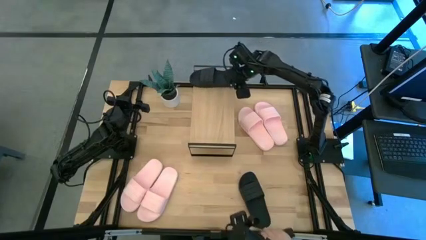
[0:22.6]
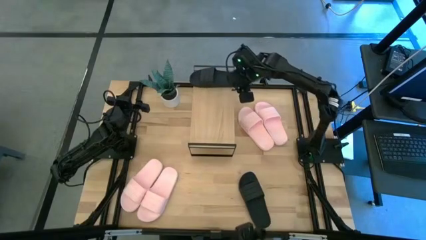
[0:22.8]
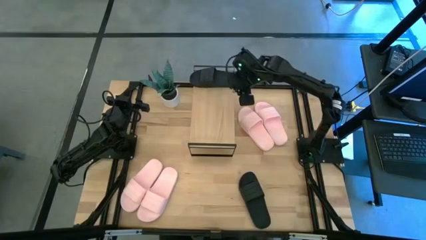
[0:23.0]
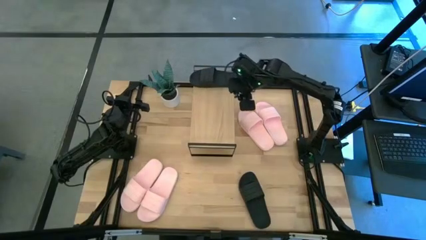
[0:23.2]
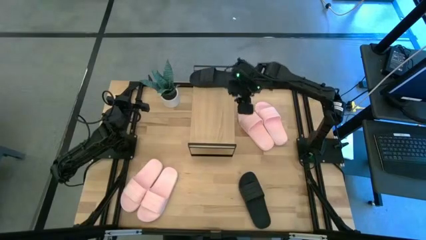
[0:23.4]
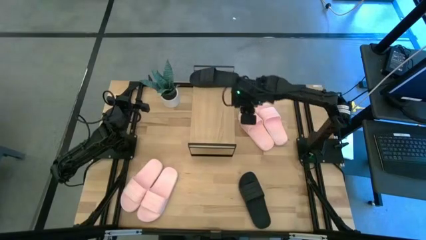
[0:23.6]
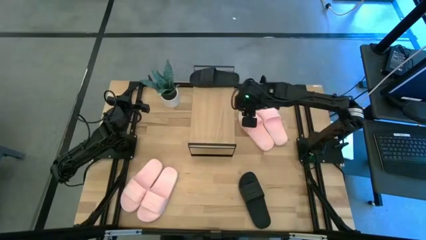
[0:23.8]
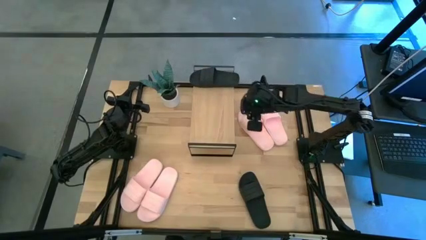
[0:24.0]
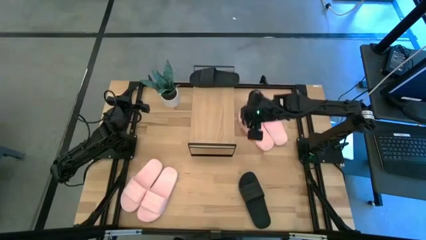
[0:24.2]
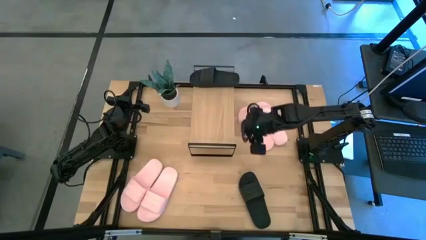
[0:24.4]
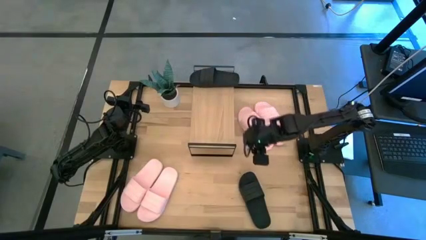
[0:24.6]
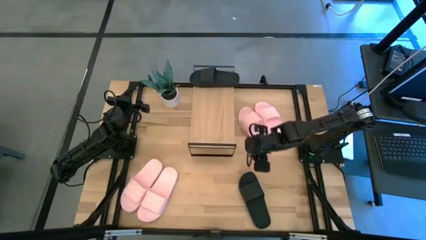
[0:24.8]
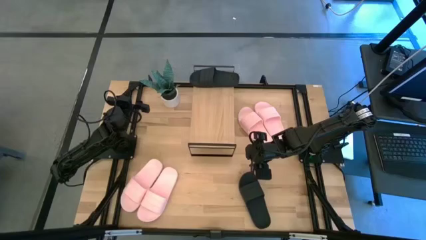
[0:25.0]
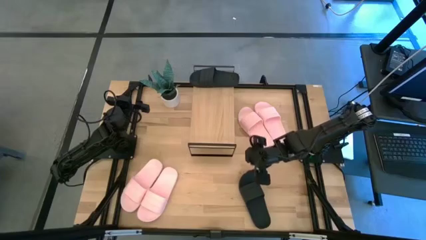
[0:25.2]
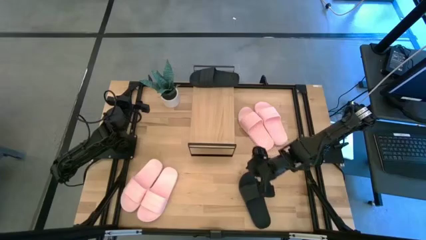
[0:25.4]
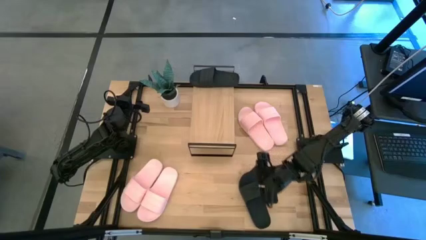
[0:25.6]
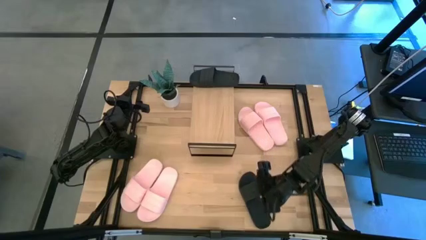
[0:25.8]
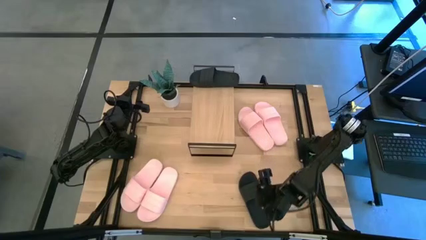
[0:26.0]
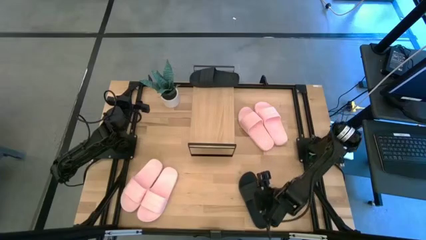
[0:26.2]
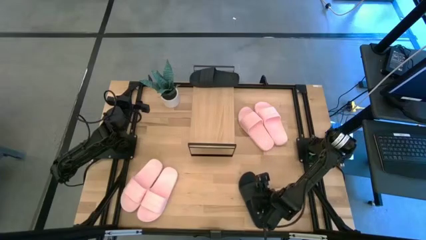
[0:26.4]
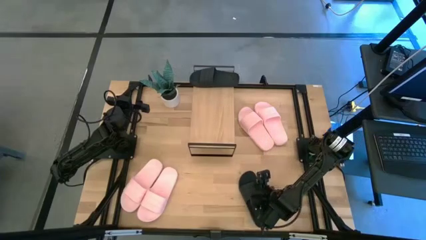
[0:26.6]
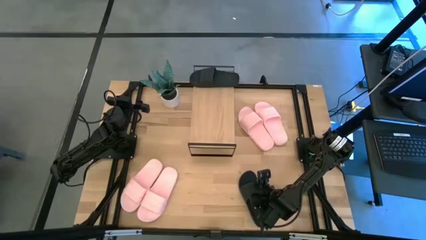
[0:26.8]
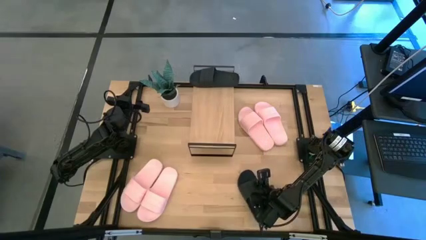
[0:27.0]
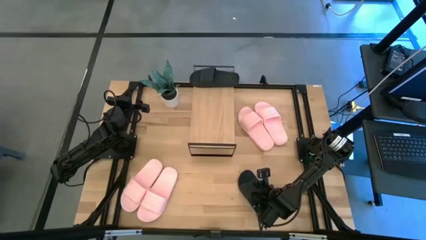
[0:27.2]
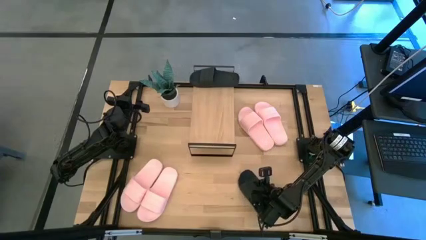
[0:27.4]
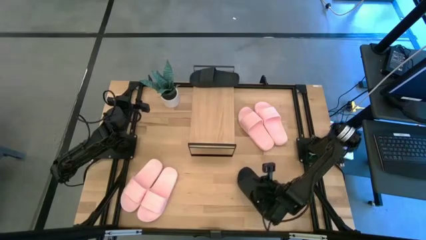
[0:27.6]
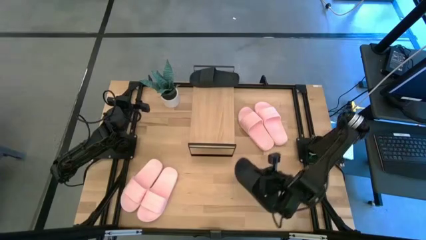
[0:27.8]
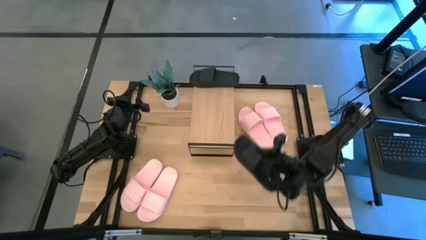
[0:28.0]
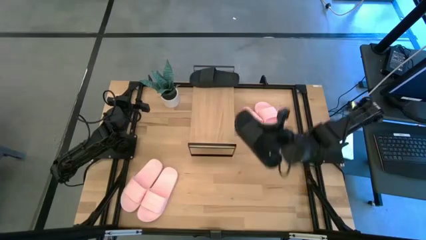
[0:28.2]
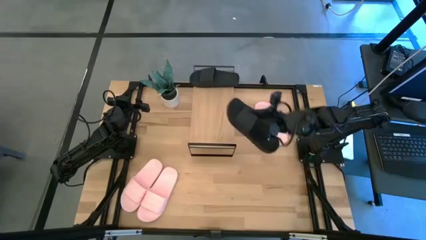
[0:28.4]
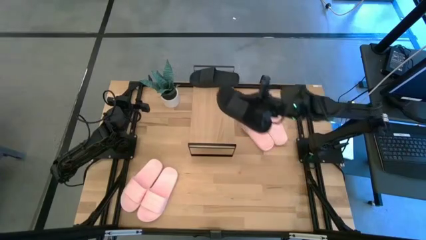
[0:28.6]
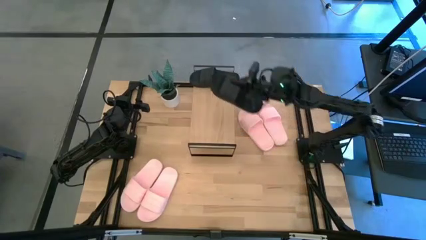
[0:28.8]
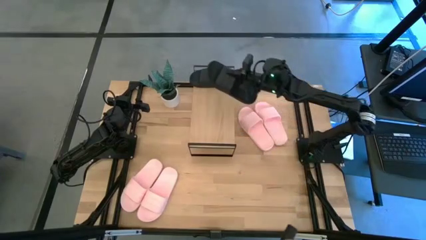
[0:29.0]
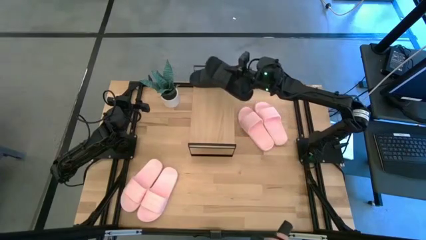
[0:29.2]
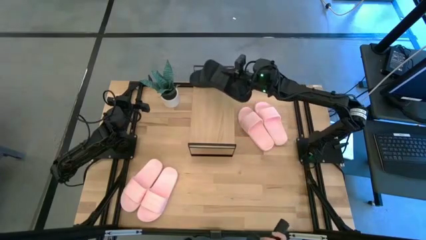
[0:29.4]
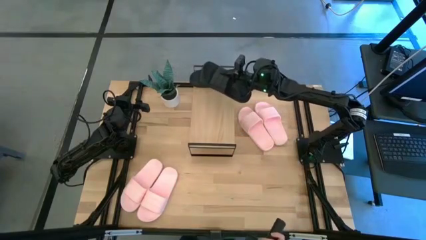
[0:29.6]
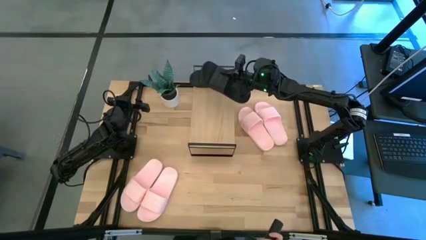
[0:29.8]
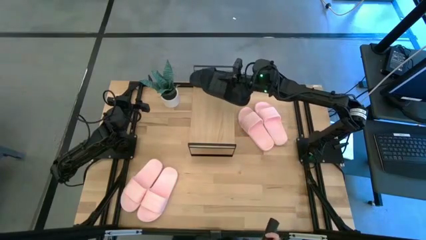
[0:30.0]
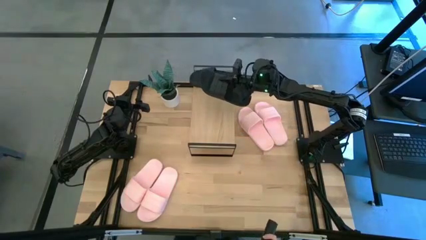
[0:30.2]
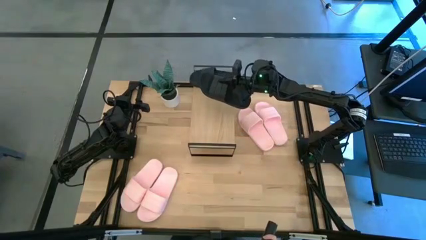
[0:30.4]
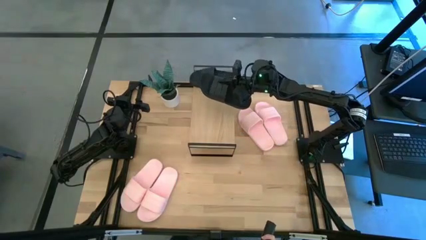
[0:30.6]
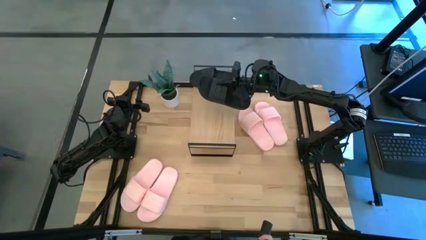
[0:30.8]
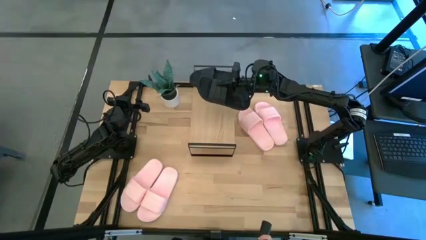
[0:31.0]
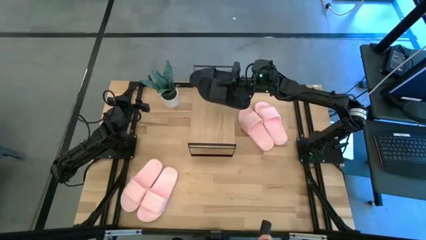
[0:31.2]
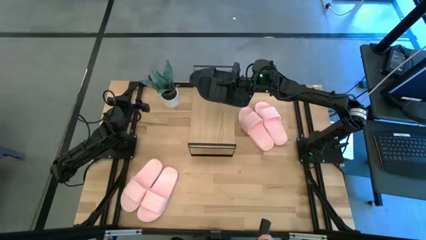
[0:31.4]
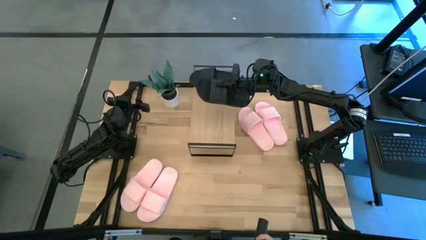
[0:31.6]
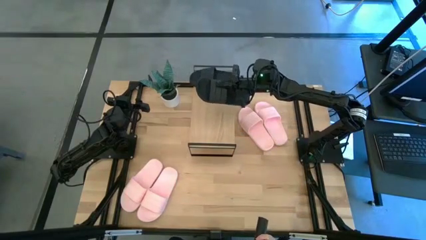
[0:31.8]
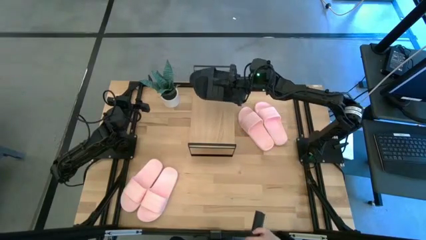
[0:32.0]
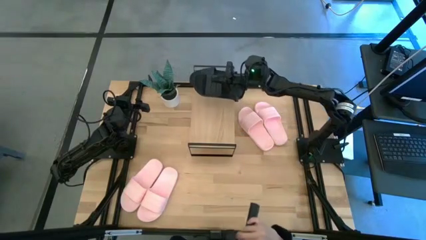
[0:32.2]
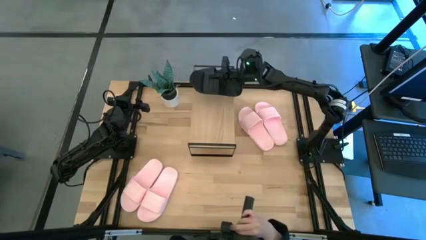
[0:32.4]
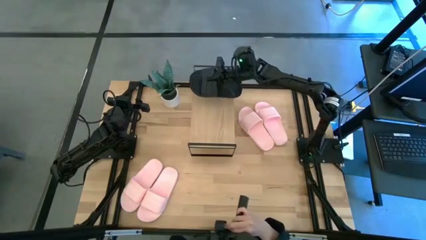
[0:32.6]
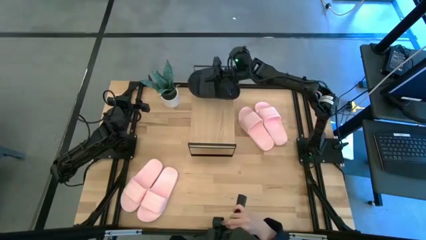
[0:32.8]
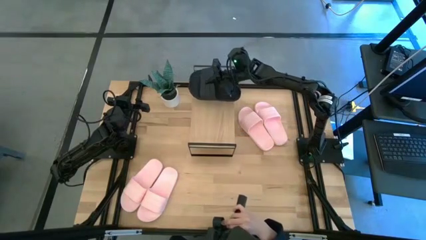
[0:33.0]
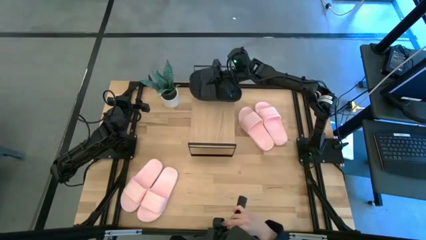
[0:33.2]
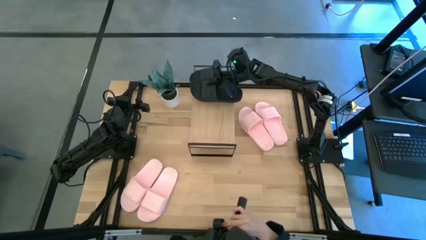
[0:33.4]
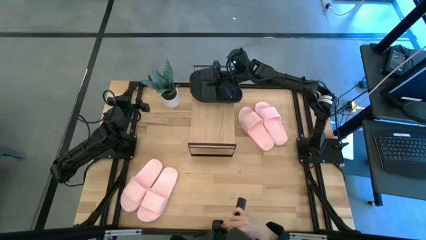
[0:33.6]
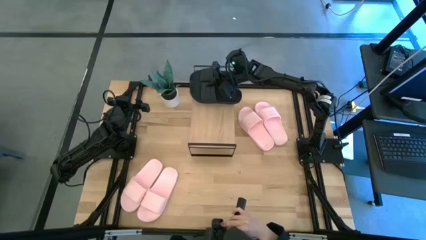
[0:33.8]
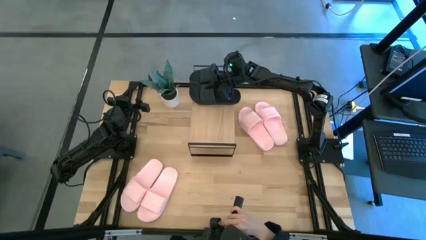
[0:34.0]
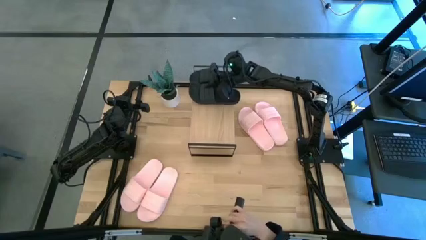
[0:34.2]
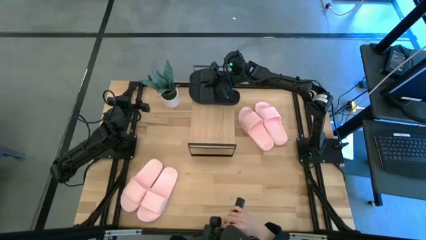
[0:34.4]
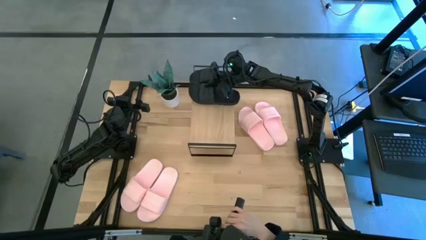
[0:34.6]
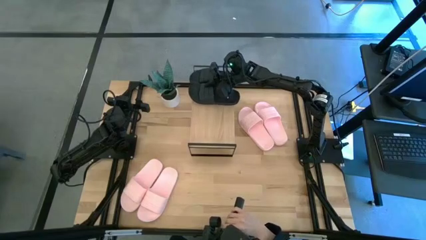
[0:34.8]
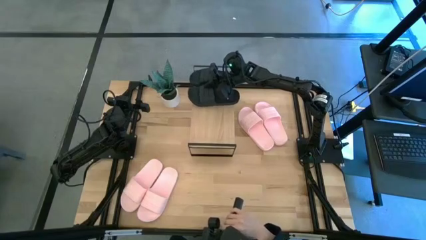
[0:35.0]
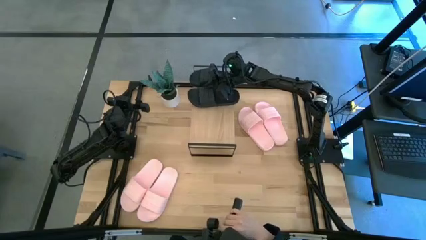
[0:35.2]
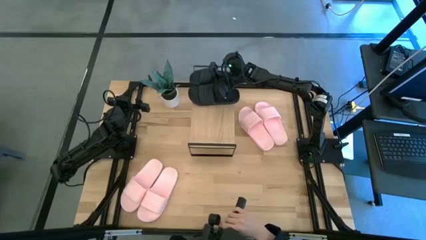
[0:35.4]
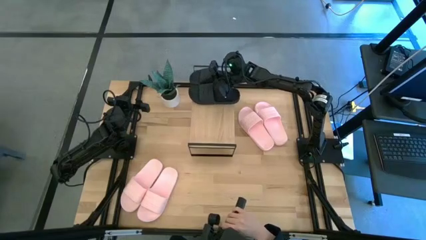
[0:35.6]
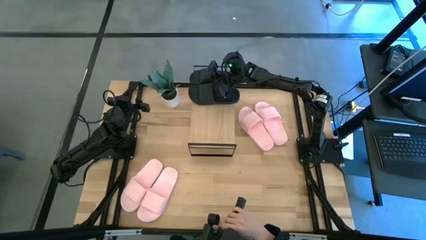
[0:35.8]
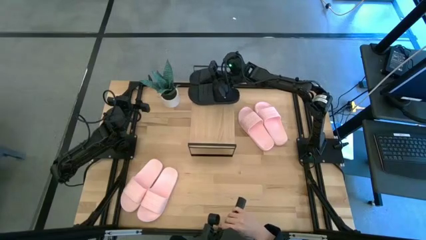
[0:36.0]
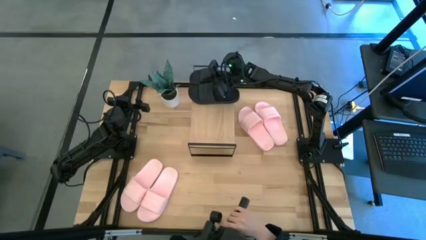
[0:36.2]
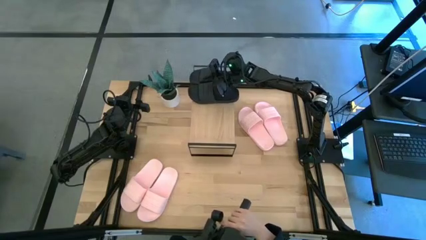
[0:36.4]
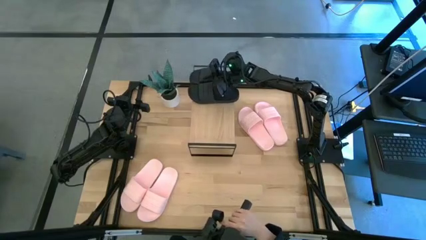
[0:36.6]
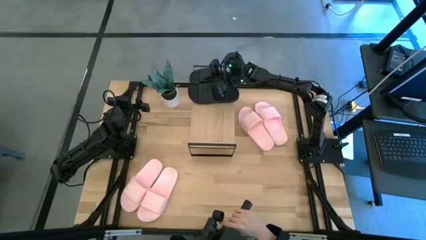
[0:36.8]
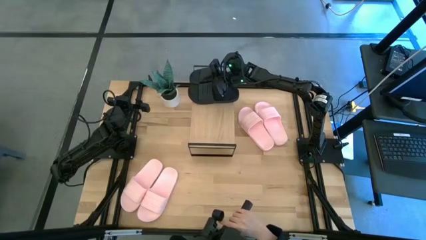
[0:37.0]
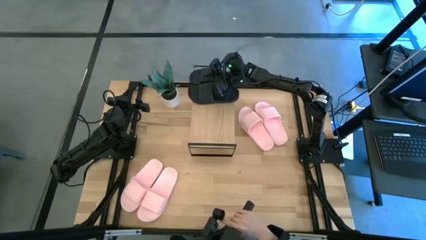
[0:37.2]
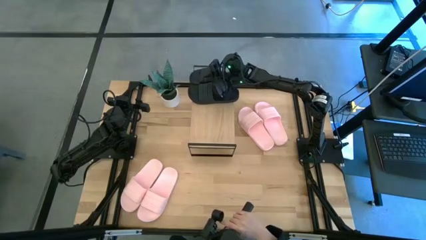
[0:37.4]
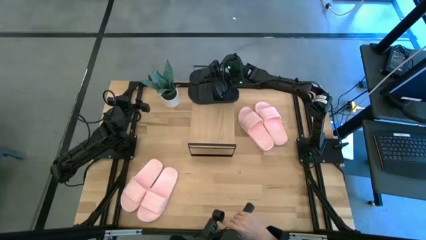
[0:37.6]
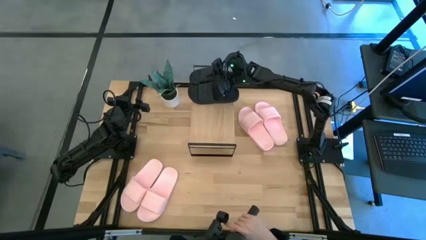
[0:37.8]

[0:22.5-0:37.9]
Task: Pick and place slides into the shelf
Put the black slide on the shelf
